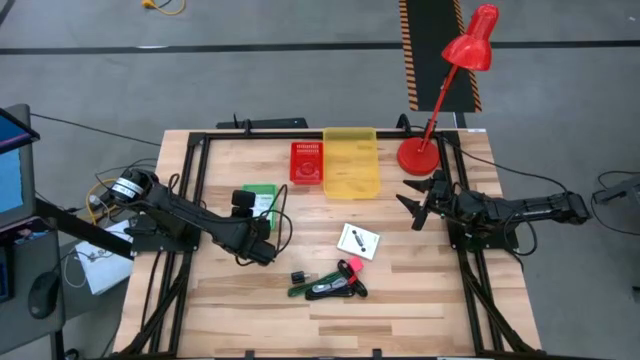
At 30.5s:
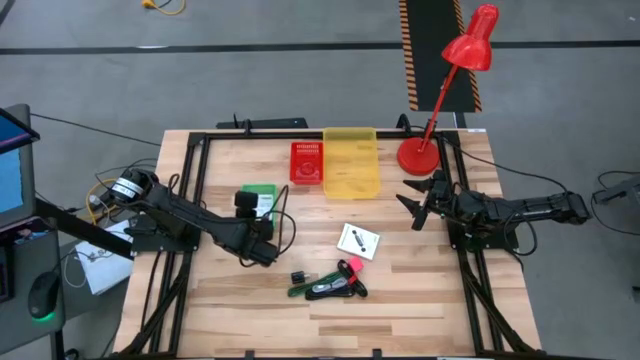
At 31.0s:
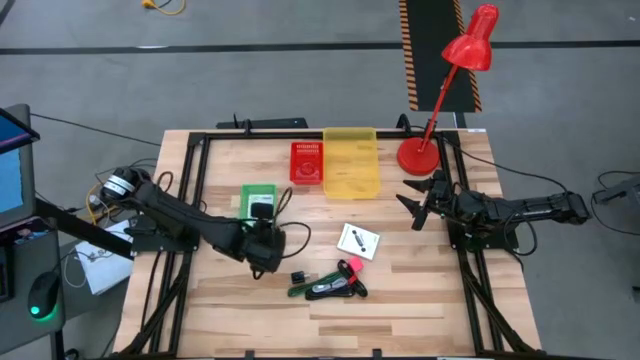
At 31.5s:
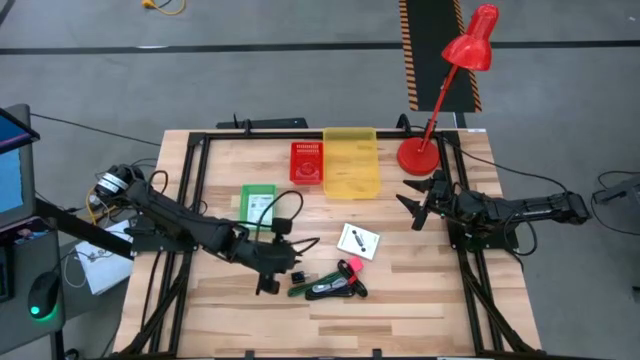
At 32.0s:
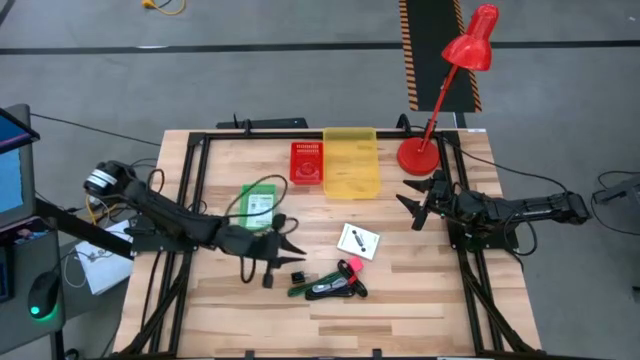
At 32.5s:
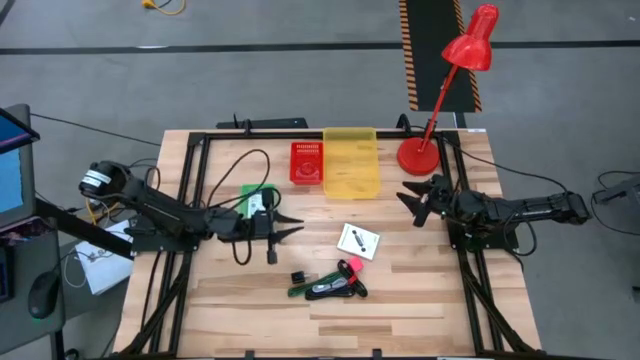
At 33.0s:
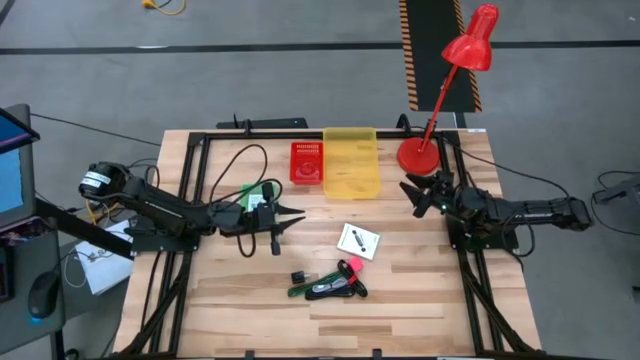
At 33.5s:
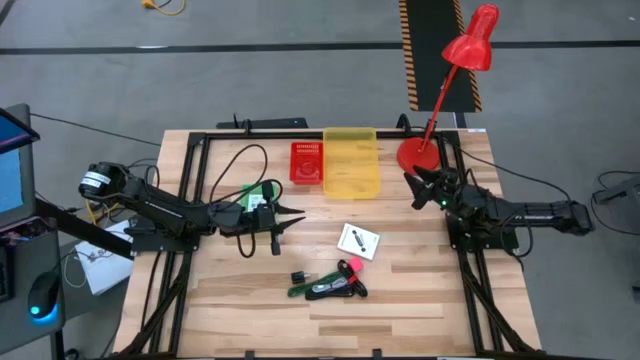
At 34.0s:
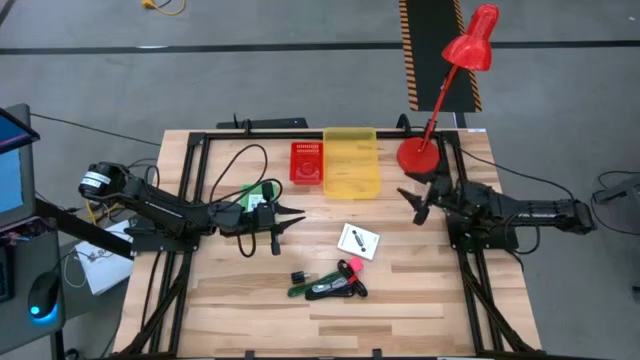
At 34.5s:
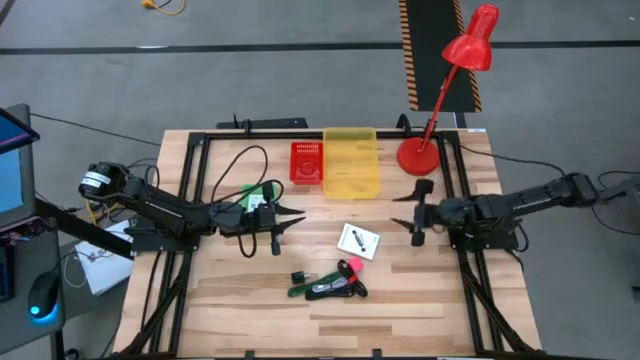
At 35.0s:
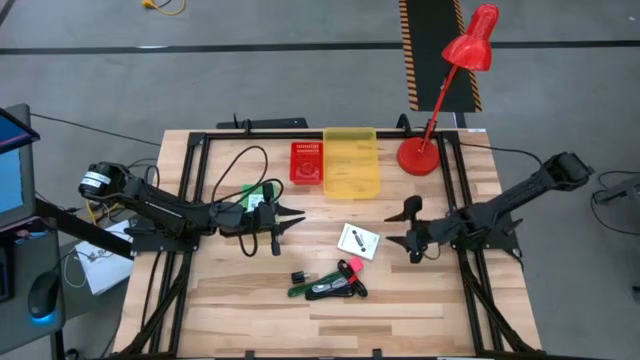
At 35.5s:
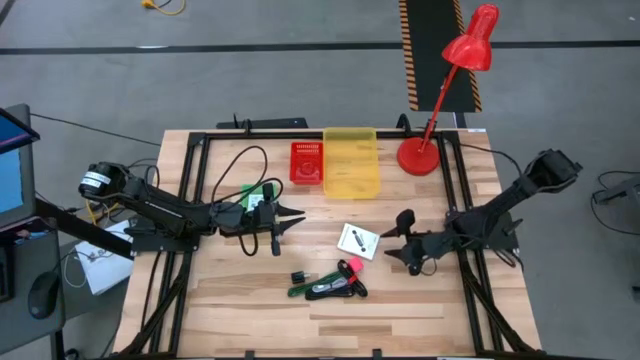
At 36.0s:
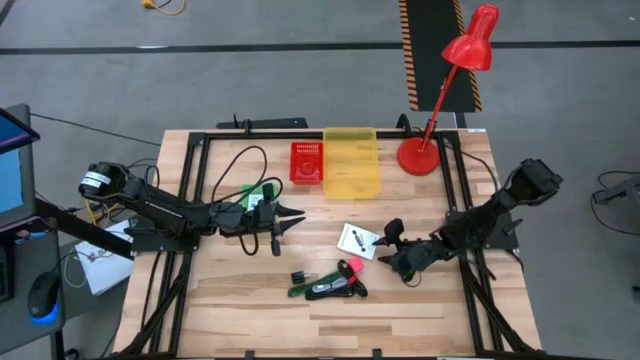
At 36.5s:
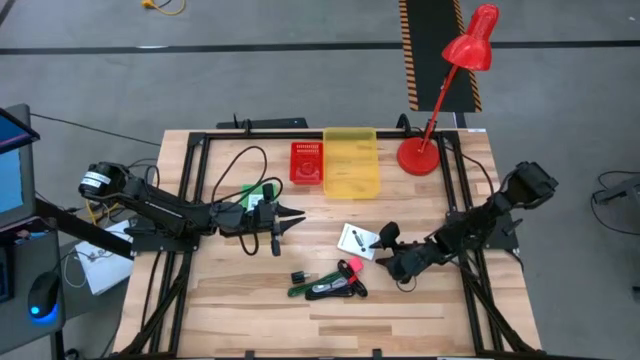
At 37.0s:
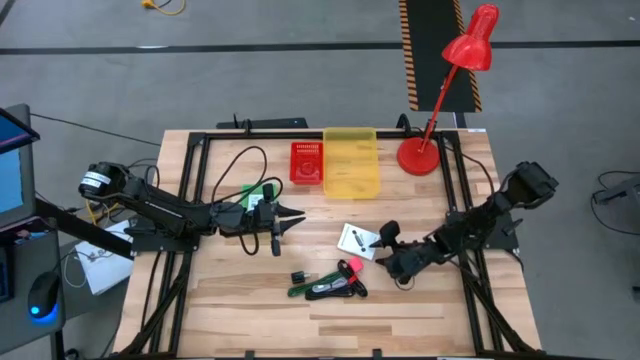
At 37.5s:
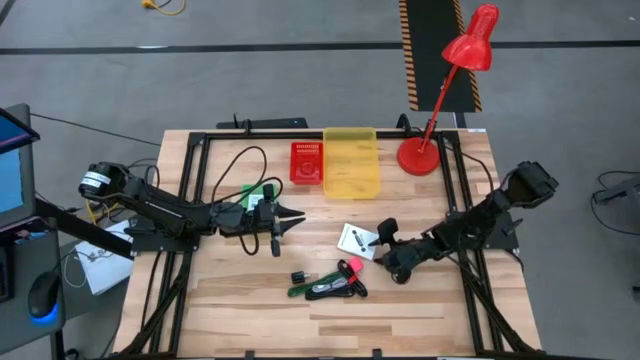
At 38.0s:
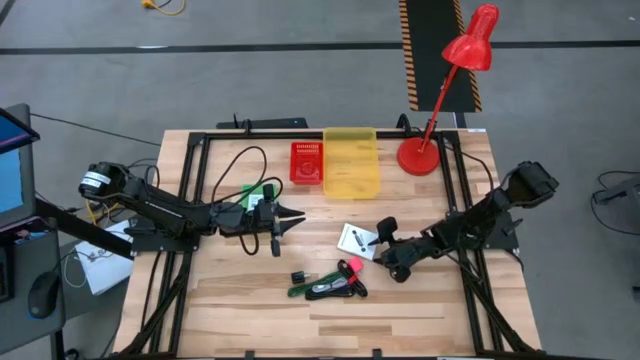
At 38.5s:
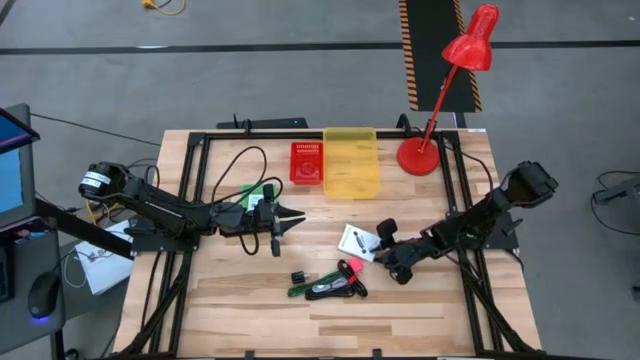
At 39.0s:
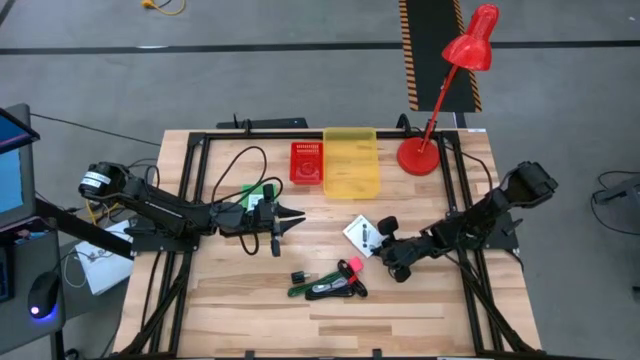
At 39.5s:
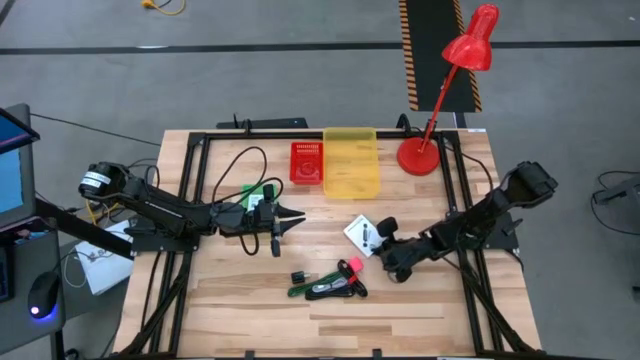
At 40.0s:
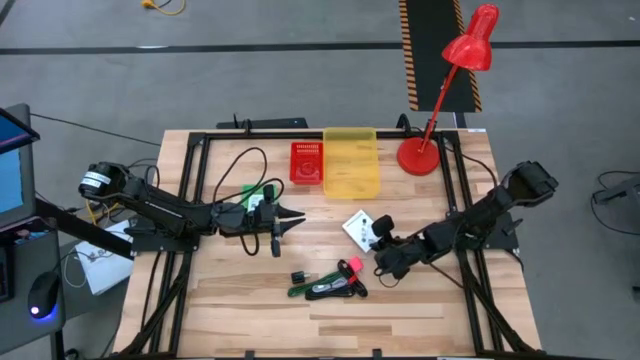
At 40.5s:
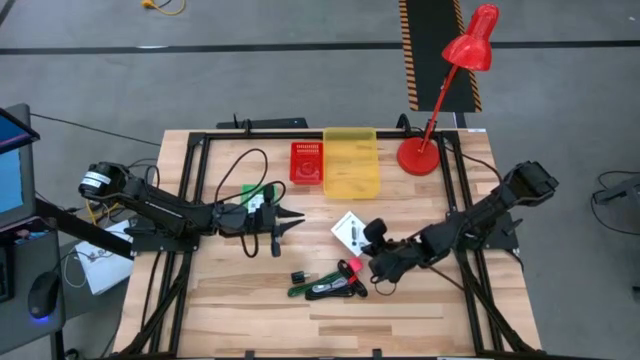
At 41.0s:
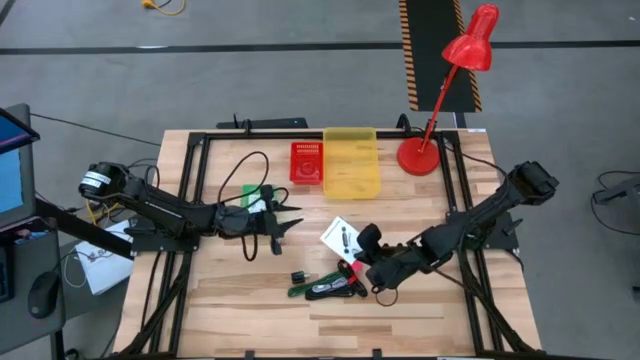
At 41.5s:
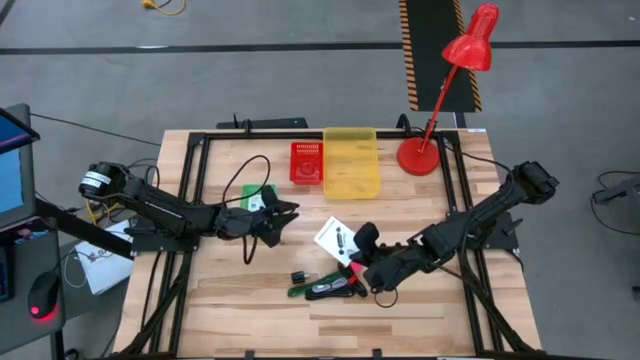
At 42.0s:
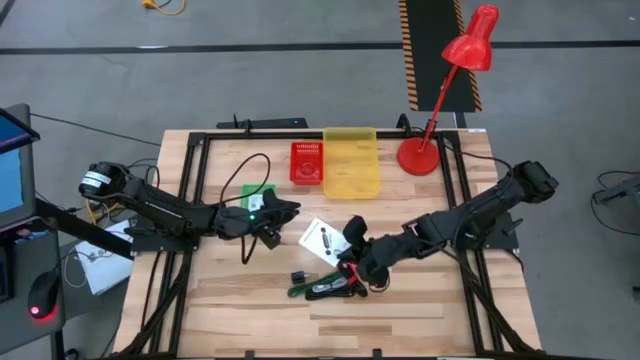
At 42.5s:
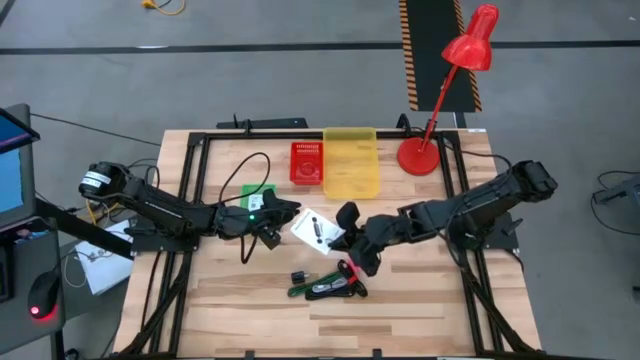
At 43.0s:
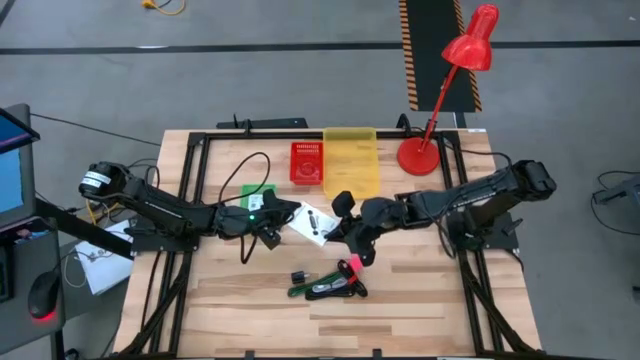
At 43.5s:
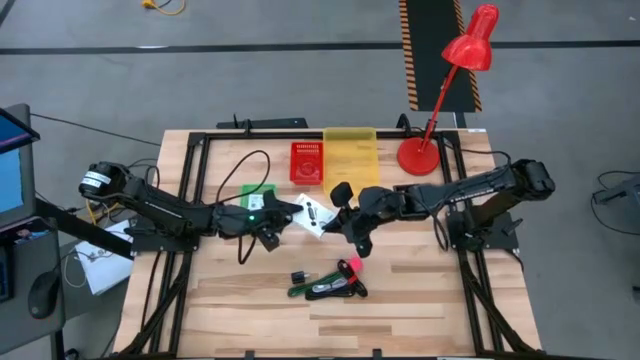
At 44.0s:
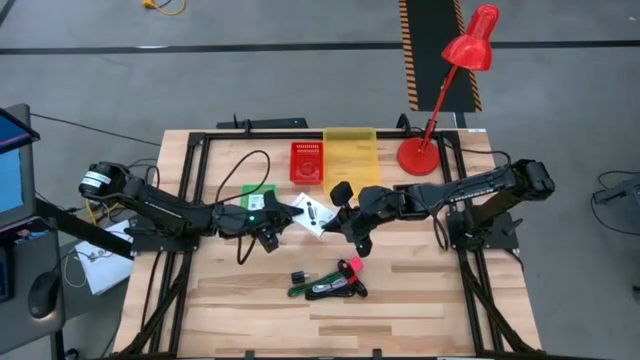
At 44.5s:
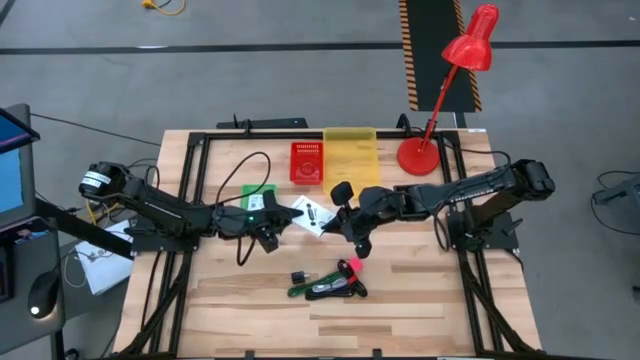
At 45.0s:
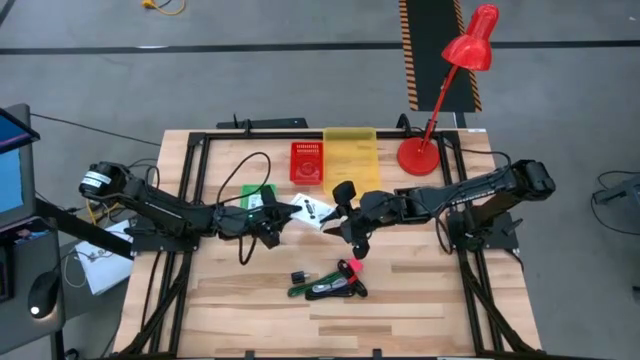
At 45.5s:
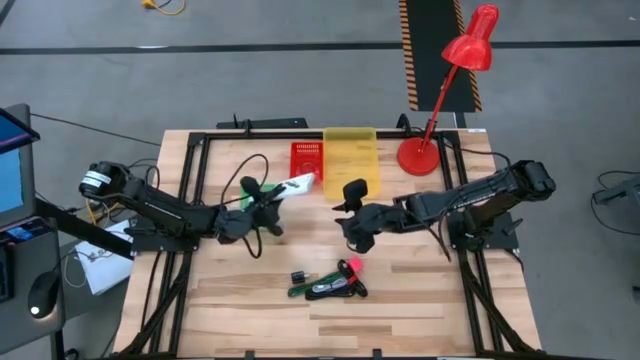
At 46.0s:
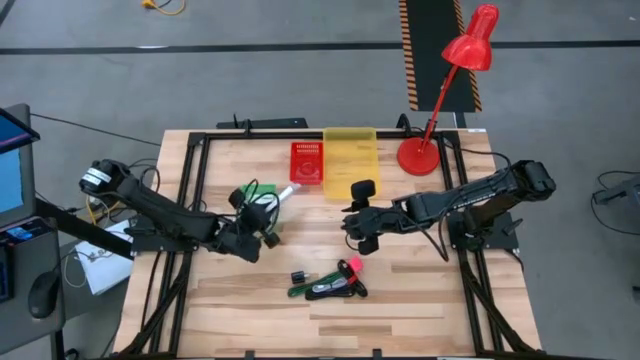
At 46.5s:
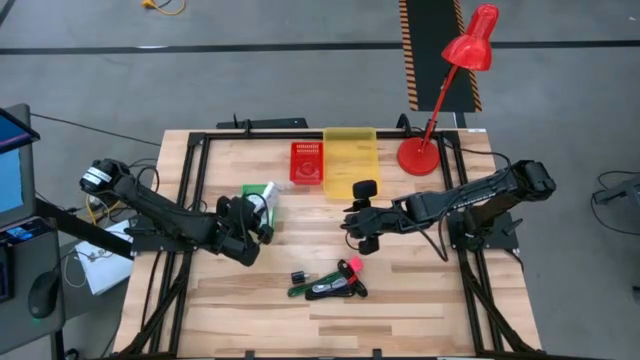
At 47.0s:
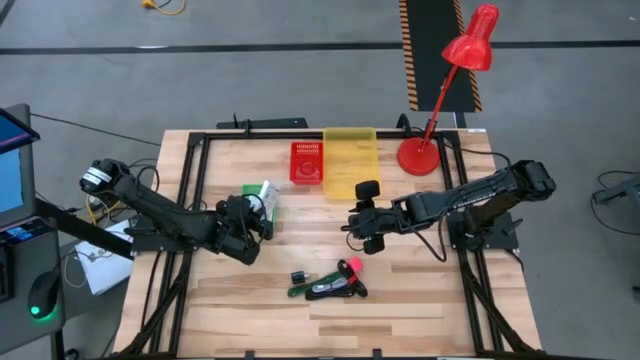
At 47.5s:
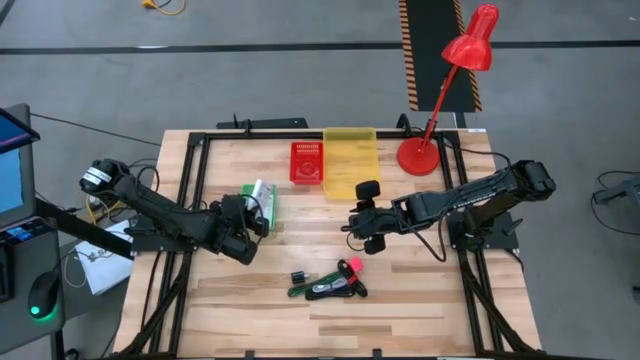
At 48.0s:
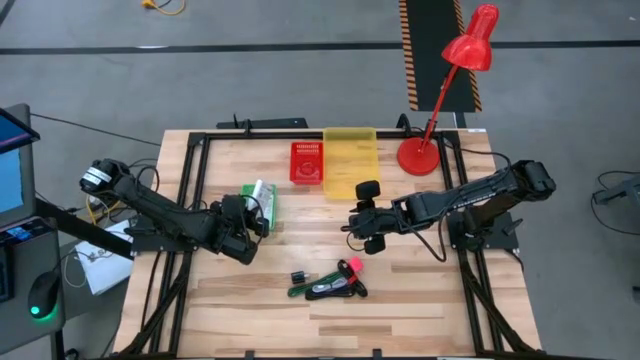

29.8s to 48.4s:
Task: Pick and place items into bin
Put the white card reader box into the green basket

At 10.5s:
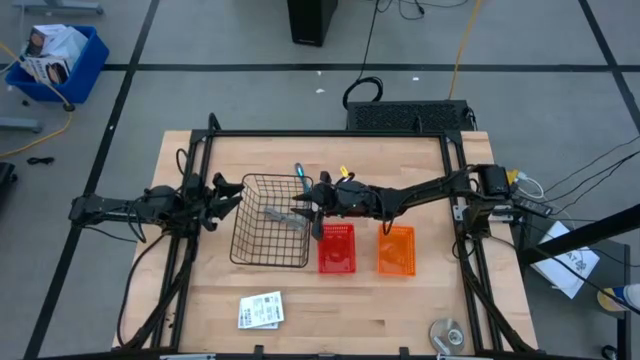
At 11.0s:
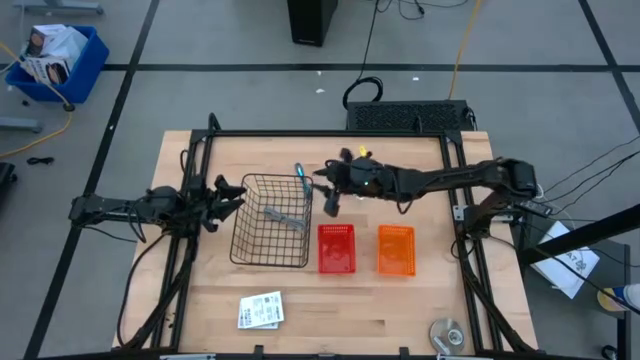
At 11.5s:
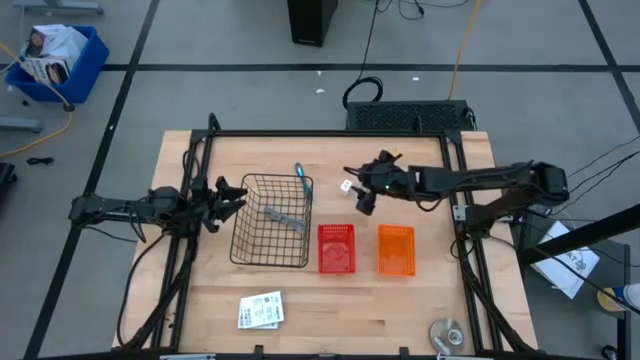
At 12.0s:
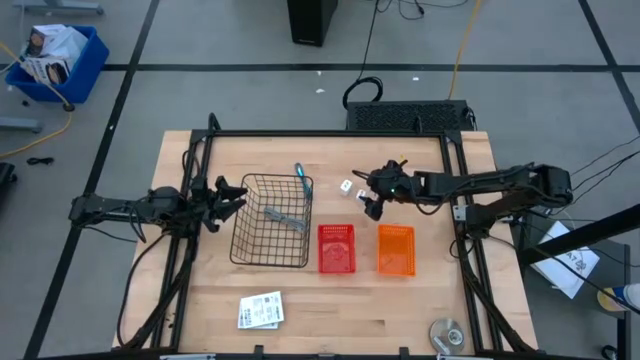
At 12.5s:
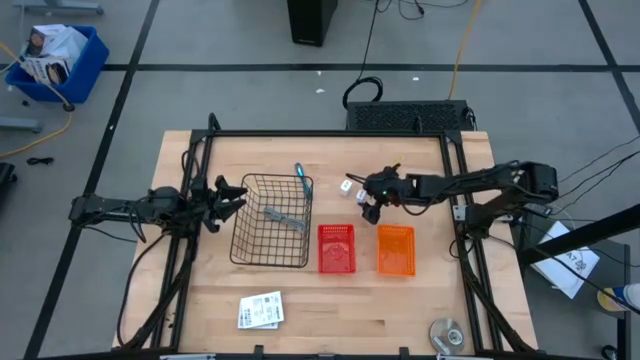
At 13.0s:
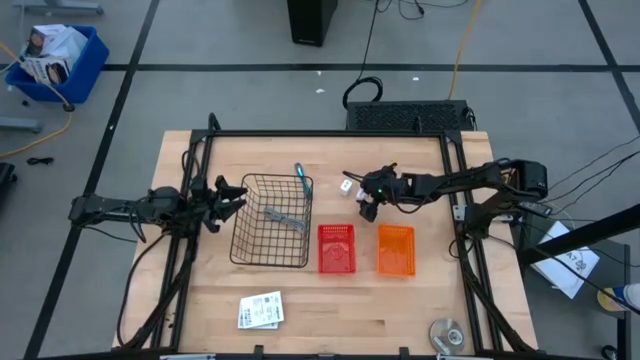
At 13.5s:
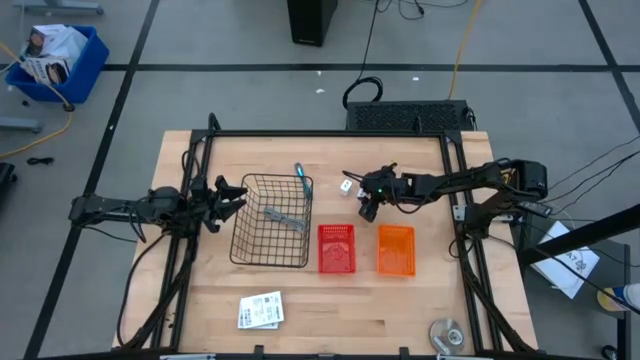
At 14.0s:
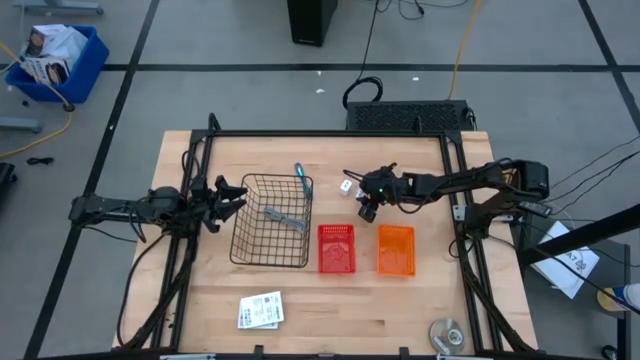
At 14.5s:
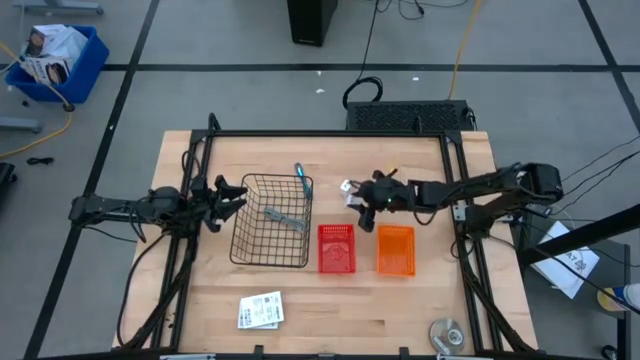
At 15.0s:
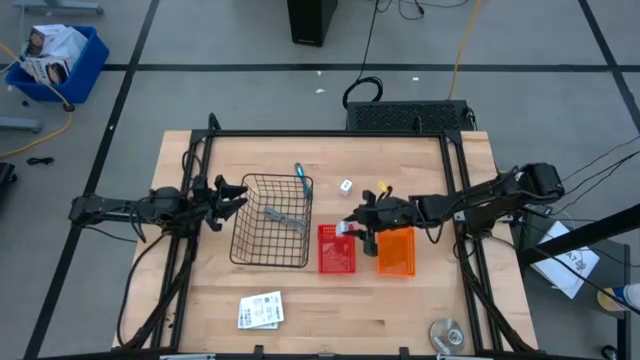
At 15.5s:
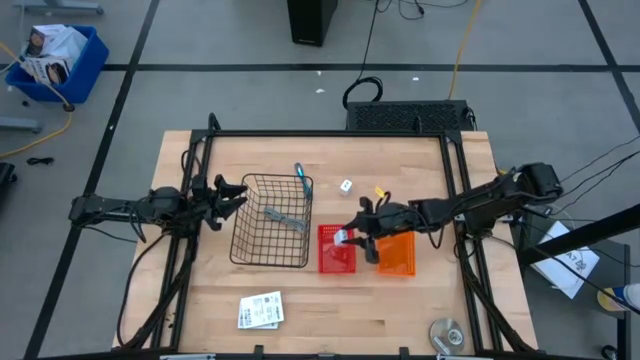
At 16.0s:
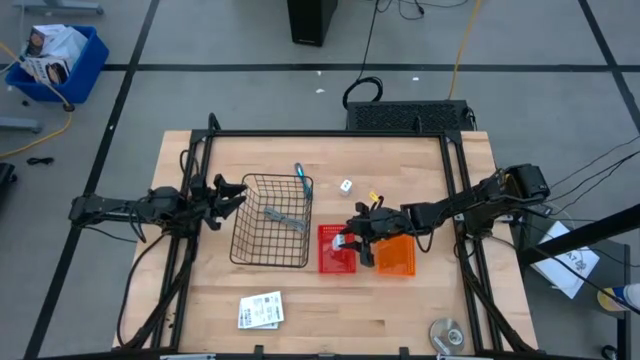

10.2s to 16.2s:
Task: Pick and place items into bin
Put the right white charger adapter into the red bin
